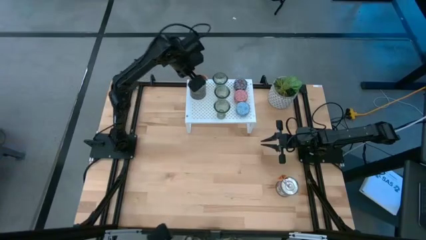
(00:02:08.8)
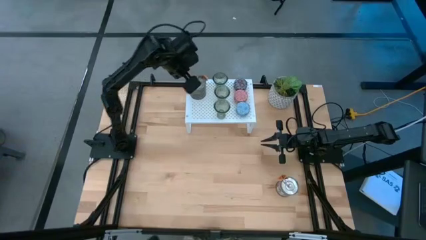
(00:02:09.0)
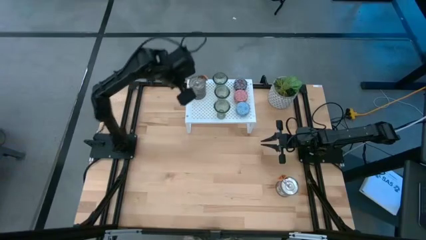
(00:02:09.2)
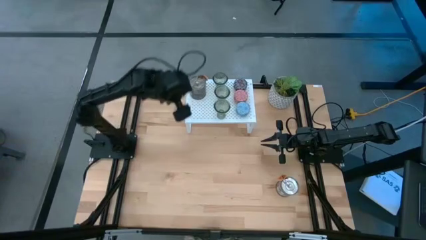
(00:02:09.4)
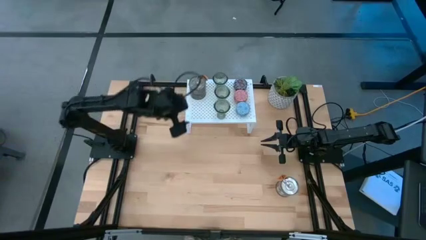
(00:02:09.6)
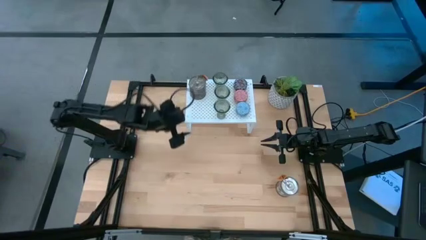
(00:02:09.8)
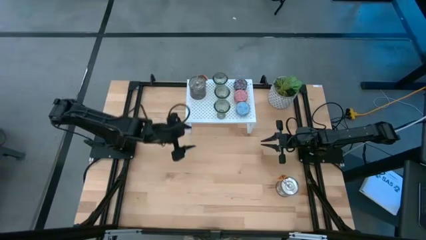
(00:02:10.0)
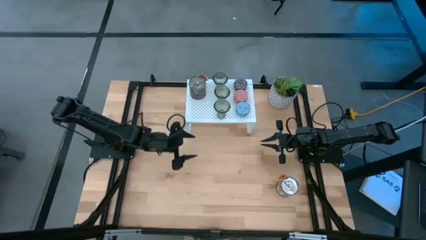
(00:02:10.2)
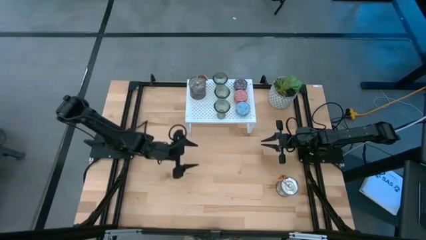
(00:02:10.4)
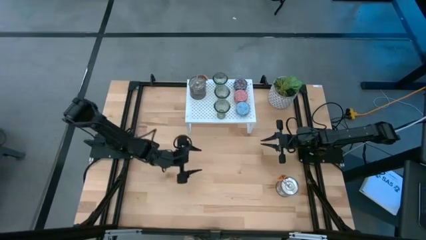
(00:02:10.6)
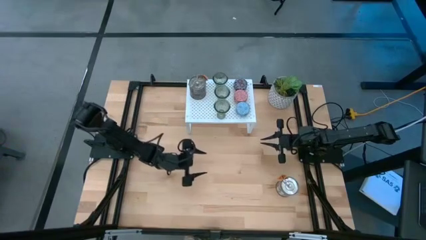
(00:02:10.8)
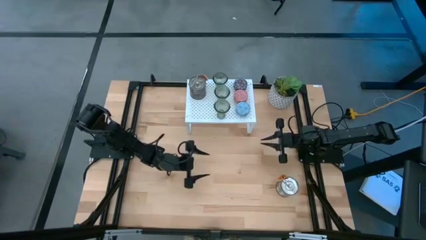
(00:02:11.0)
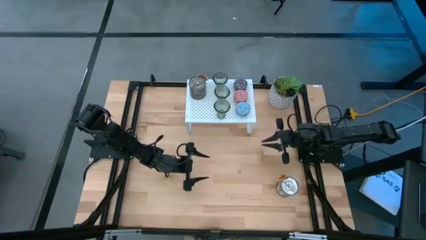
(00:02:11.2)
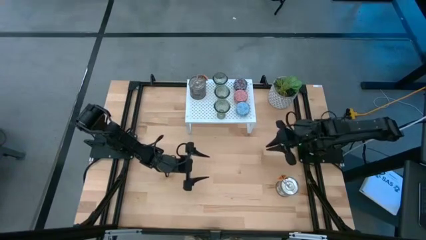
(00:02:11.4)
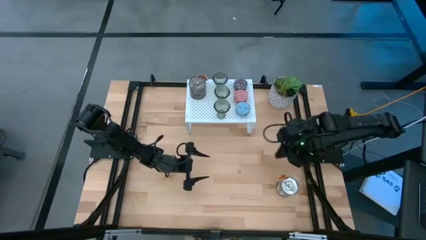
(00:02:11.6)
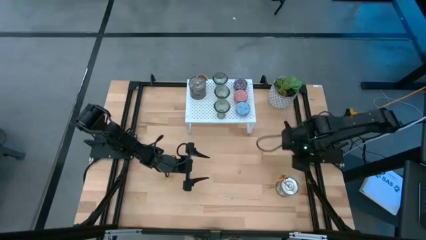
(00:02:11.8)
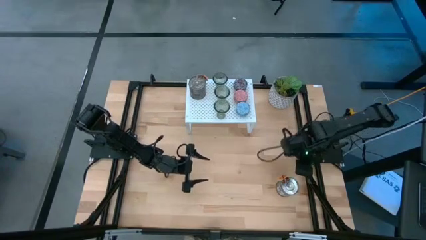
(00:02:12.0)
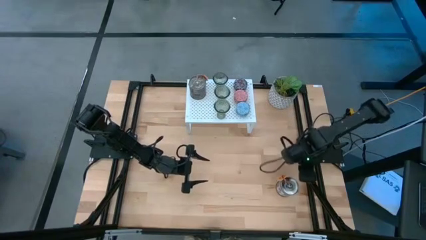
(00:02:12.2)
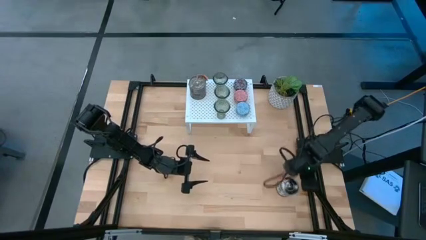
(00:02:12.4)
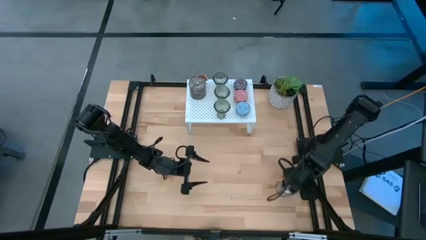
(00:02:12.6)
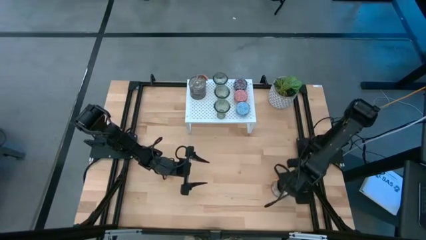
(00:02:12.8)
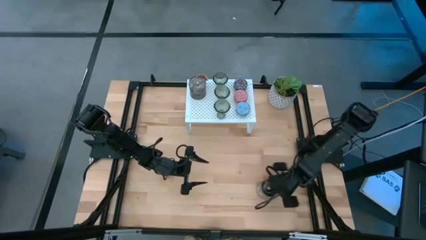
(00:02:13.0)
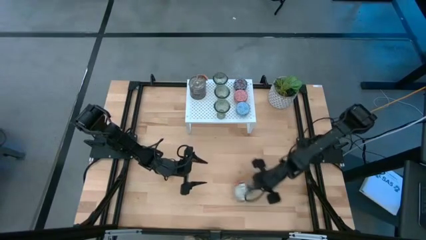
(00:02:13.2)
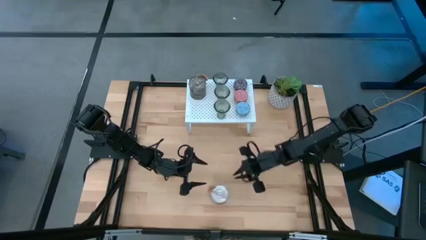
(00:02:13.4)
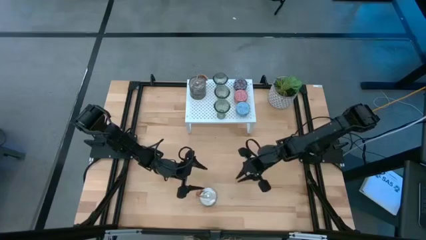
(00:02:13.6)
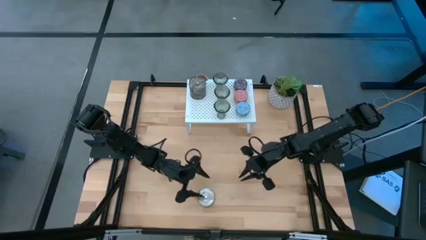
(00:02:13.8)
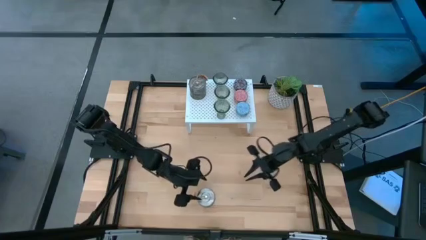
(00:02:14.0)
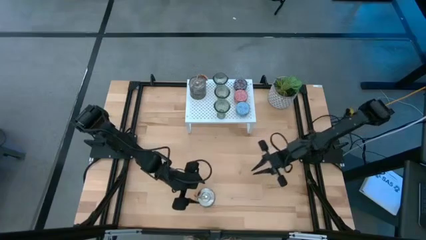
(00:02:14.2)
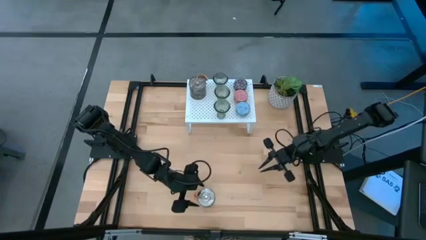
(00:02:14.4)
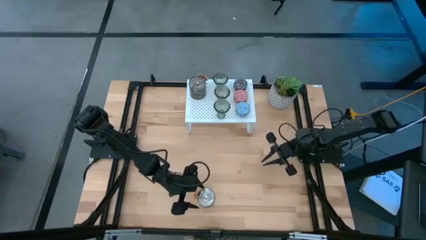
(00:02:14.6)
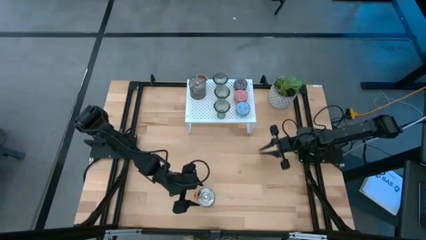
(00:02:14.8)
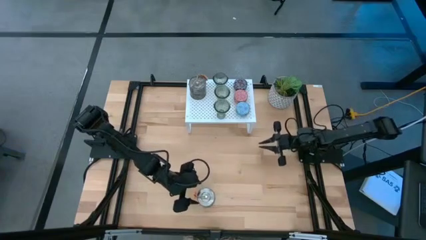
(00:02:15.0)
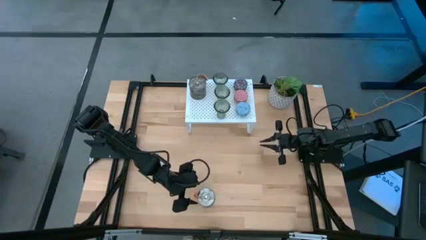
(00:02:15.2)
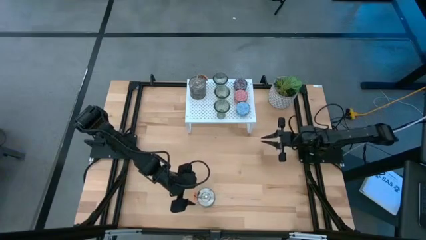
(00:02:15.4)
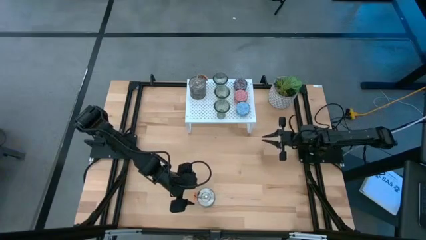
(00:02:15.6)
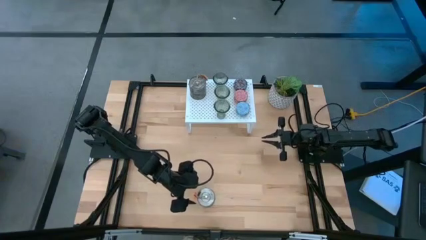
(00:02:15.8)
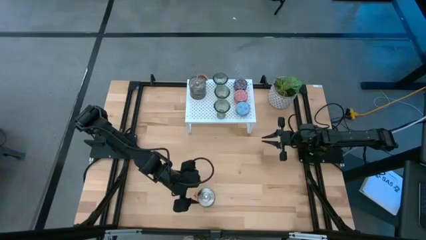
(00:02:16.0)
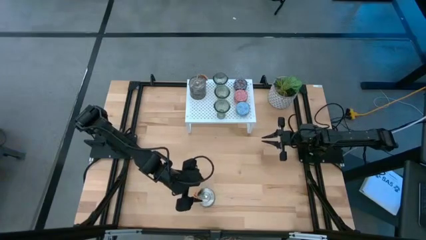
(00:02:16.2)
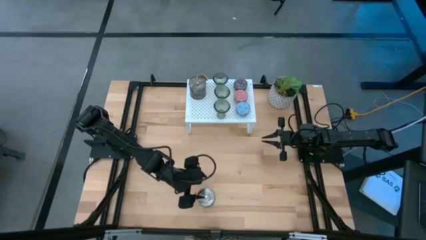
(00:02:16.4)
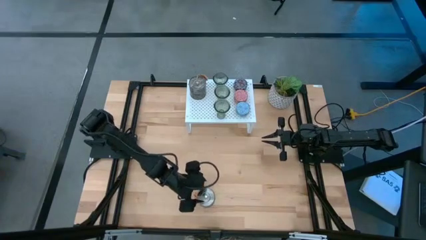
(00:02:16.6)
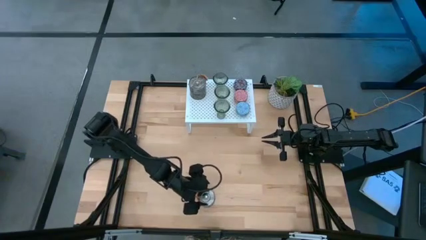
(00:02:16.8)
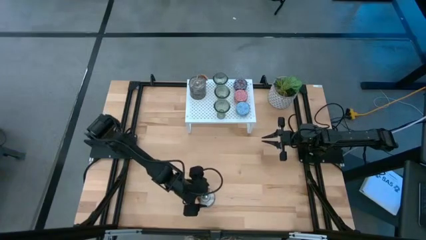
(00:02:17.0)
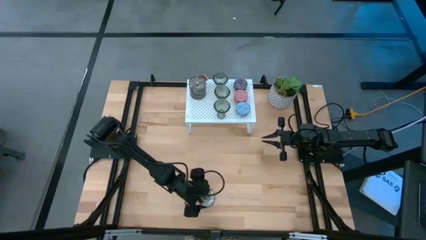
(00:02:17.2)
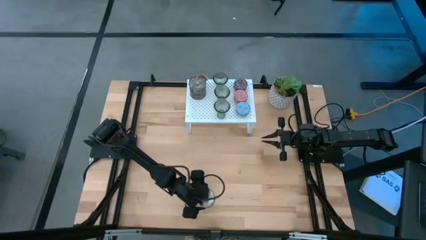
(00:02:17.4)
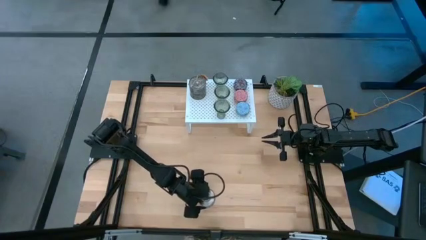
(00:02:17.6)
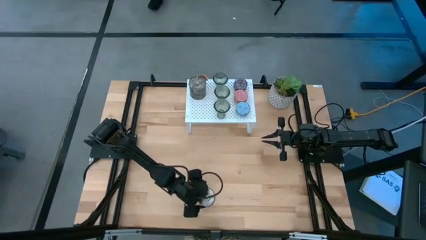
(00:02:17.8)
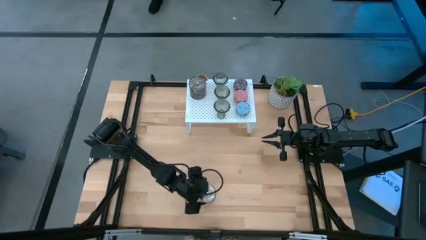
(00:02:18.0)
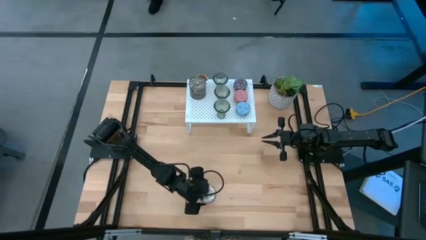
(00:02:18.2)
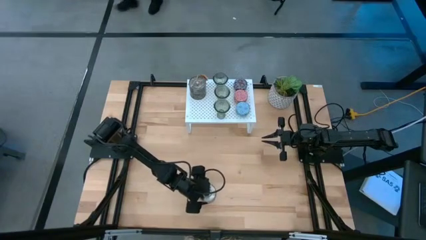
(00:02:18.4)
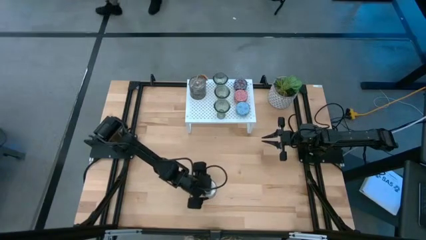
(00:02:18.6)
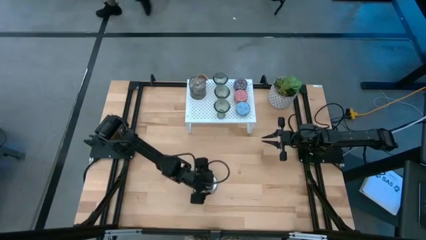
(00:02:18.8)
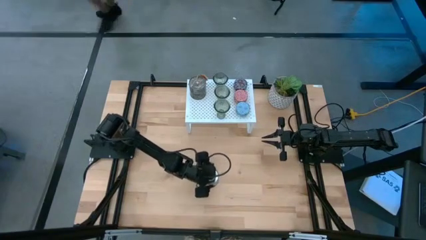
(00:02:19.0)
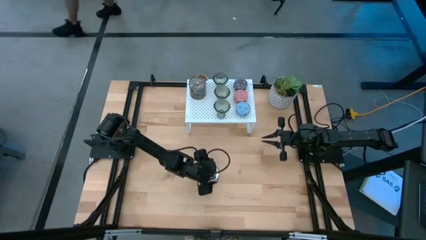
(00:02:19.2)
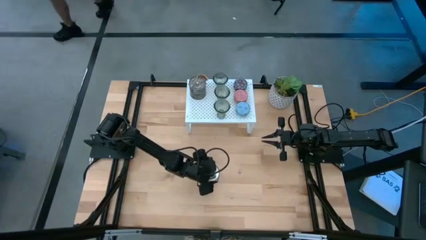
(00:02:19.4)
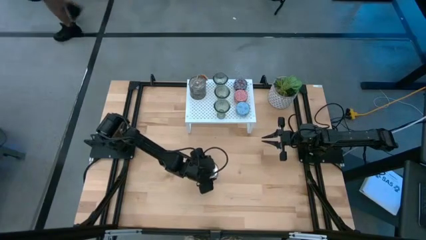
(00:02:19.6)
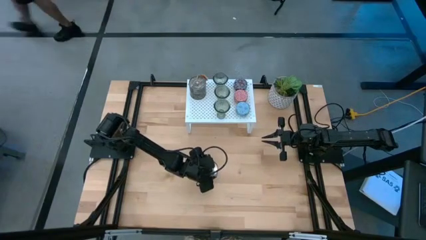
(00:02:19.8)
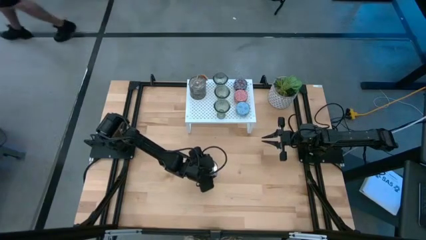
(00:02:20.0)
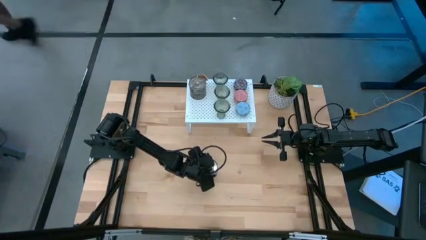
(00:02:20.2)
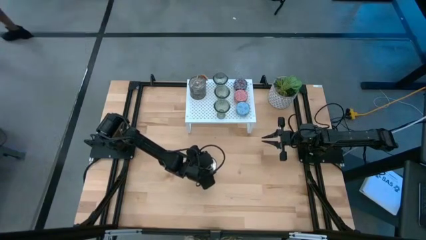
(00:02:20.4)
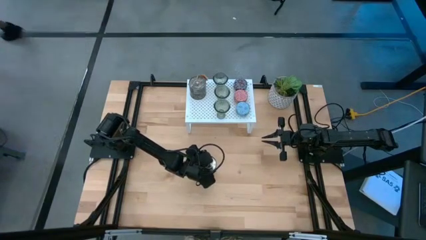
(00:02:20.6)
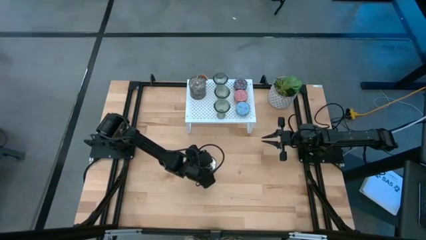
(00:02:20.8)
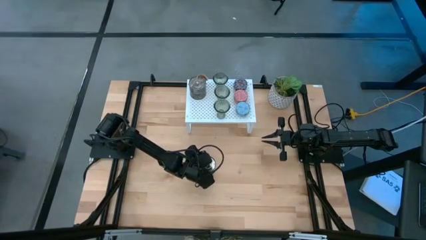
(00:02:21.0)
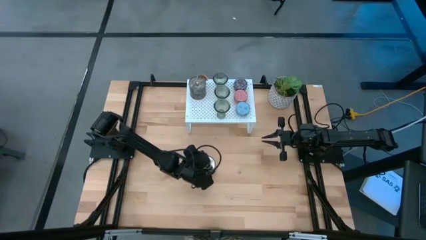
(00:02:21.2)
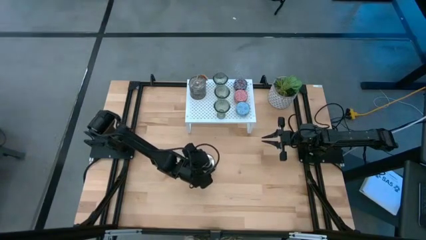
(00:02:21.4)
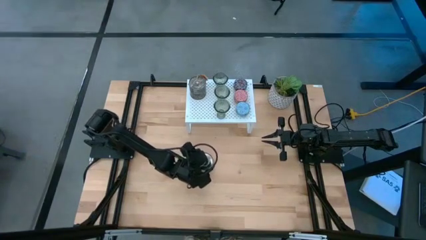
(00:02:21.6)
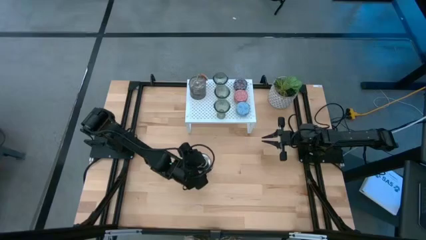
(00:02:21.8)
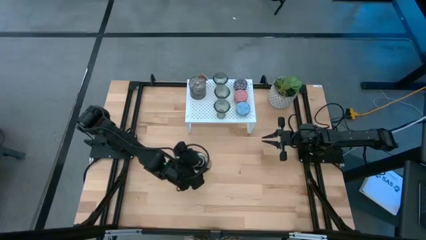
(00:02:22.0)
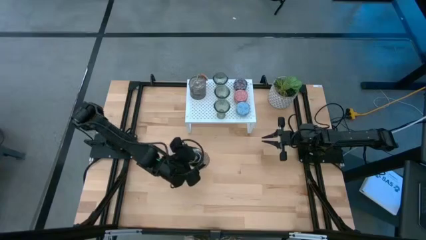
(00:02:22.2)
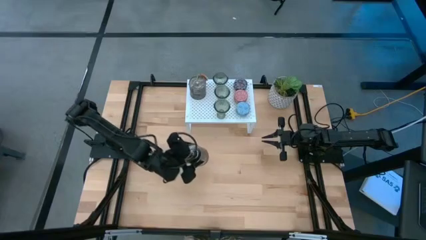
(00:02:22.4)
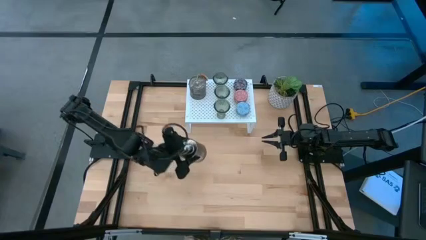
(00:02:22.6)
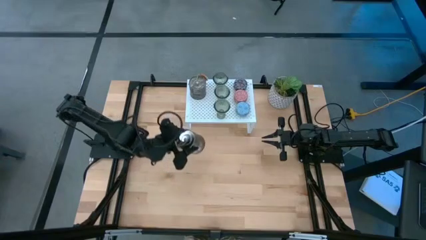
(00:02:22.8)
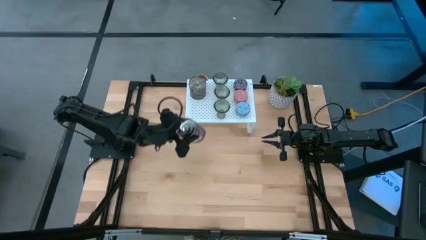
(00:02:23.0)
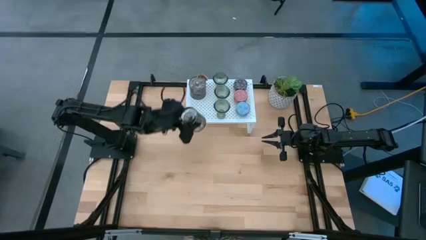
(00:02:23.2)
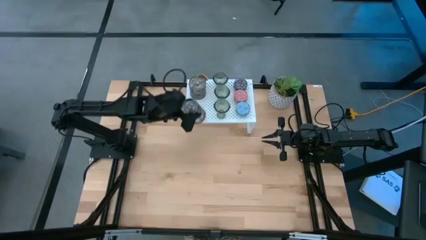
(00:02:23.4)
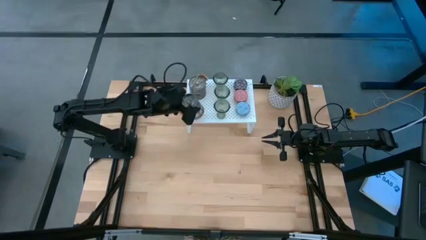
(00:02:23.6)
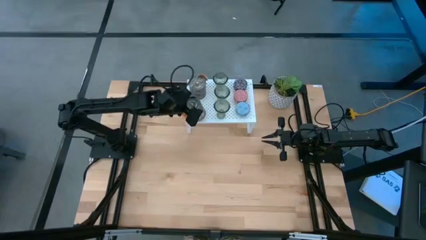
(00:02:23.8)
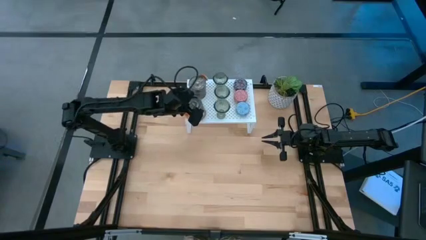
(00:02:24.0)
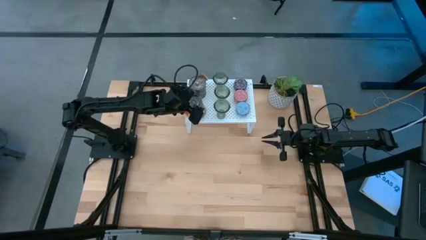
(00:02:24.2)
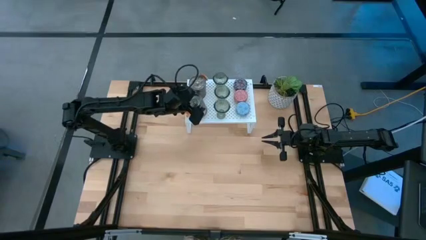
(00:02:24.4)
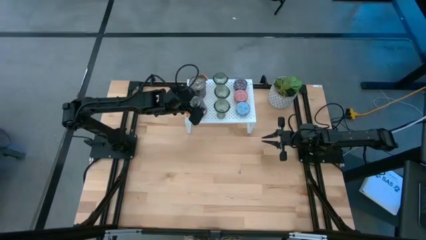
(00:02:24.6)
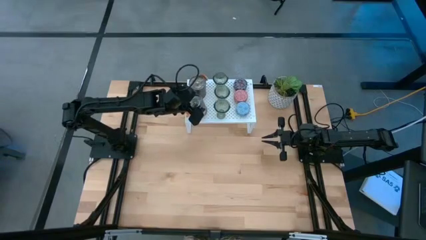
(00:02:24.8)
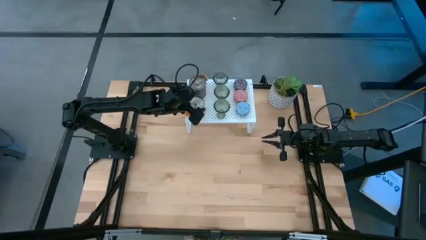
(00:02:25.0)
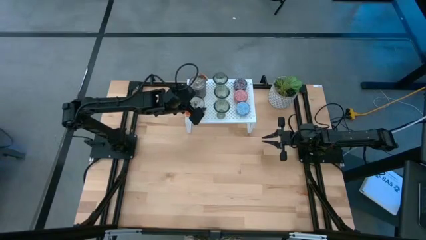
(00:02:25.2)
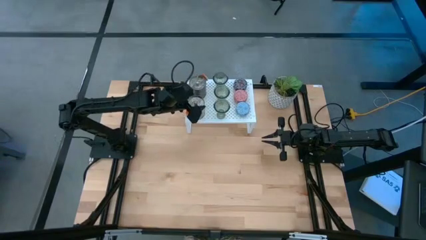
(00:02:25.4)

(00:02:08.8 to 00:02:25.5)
Task: Pick & Place candle stick holders
Put the silver scented candle on the shelf aligned with the other silver scented candle
